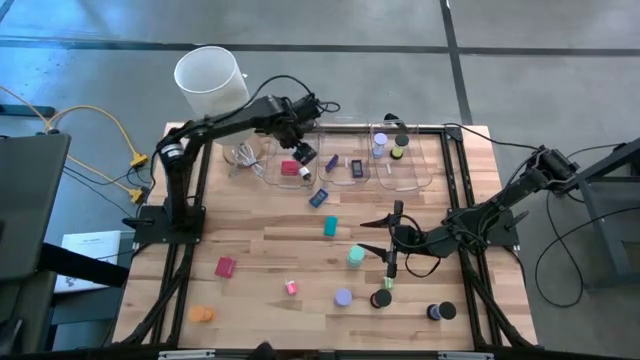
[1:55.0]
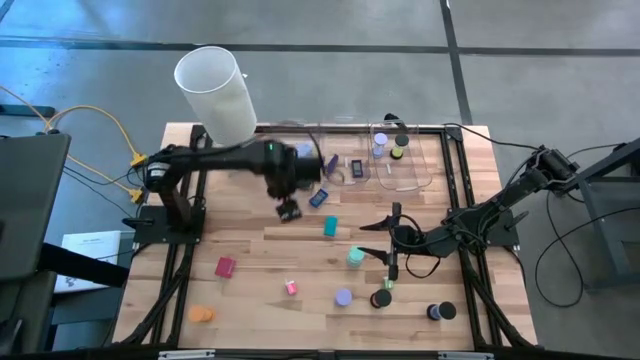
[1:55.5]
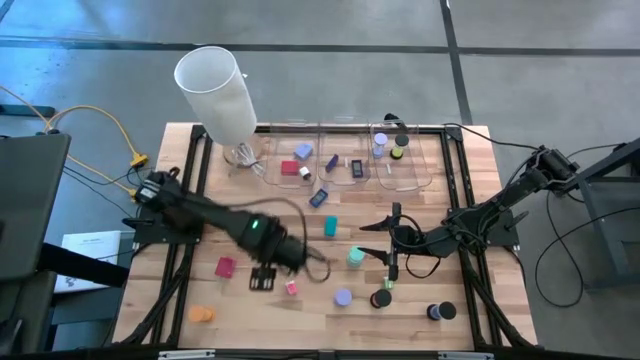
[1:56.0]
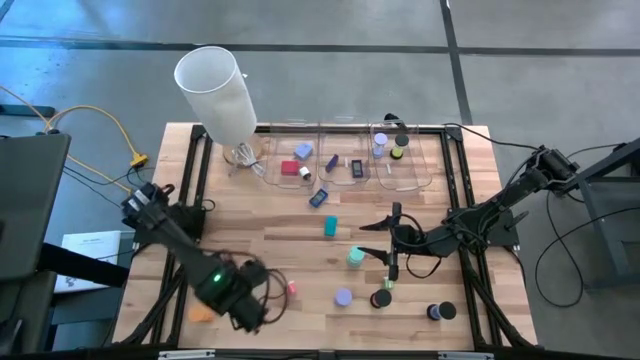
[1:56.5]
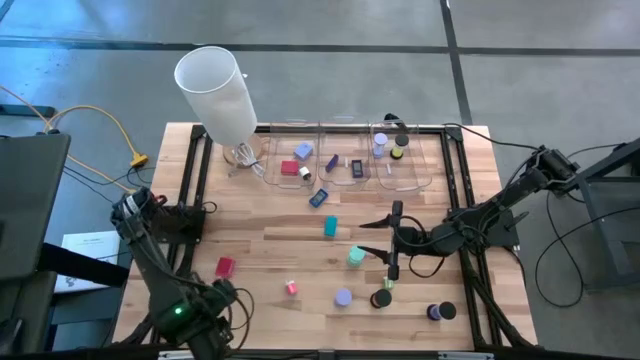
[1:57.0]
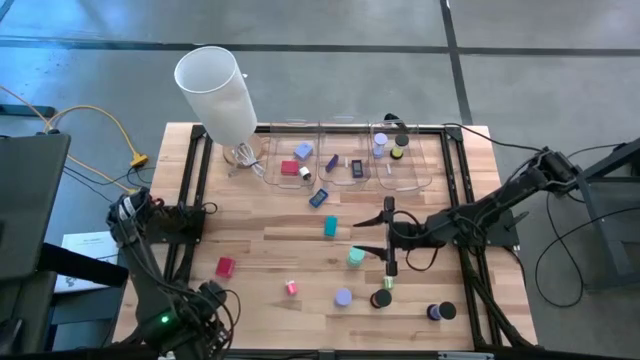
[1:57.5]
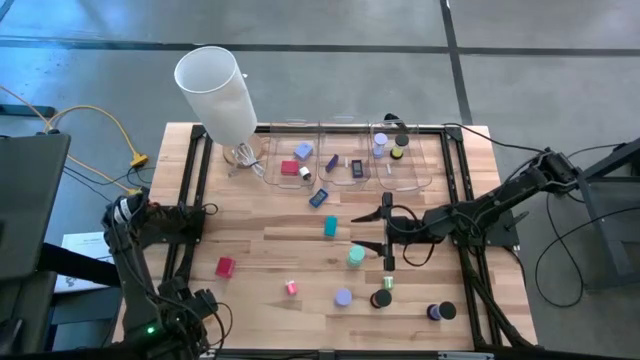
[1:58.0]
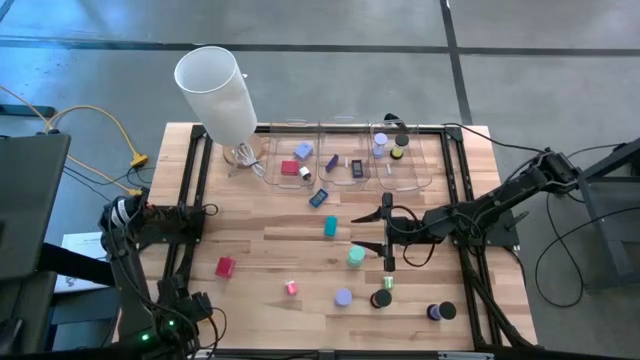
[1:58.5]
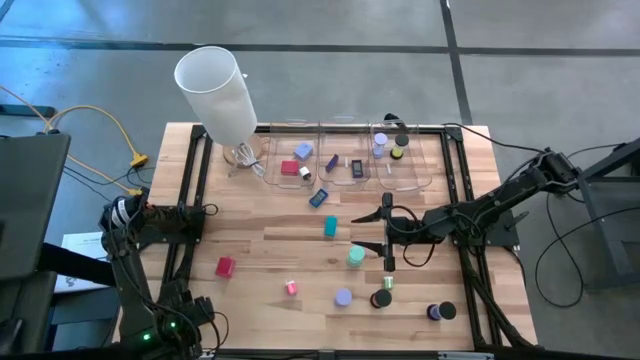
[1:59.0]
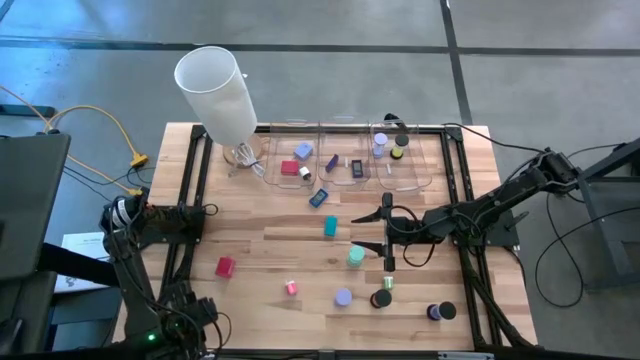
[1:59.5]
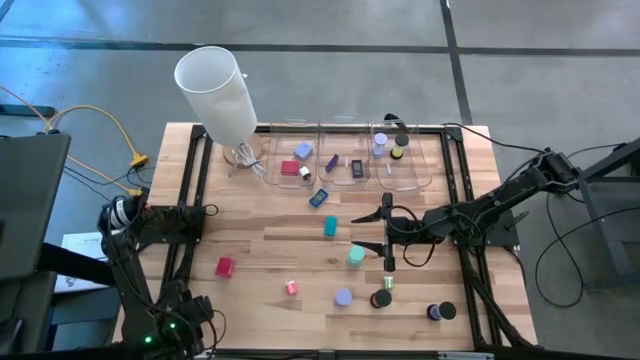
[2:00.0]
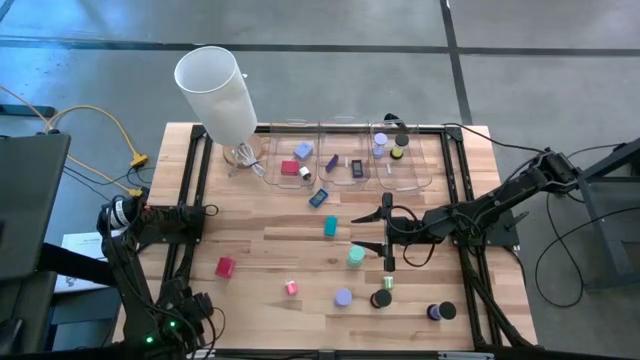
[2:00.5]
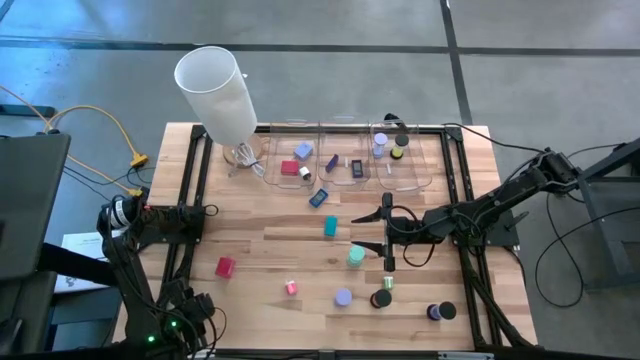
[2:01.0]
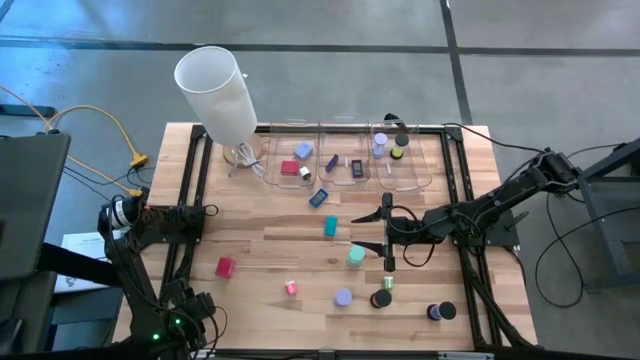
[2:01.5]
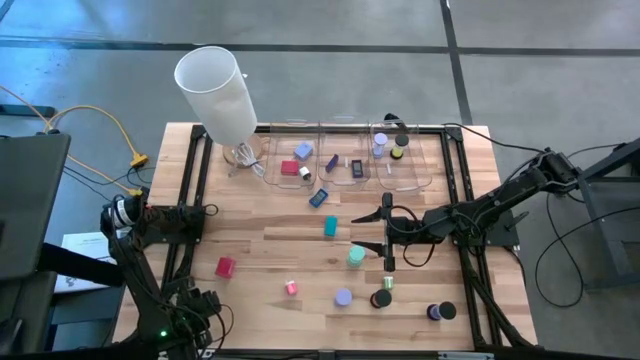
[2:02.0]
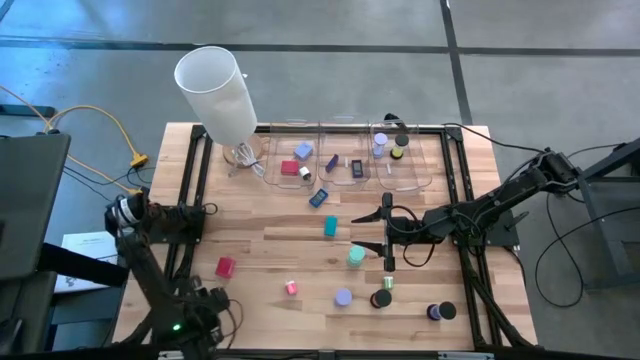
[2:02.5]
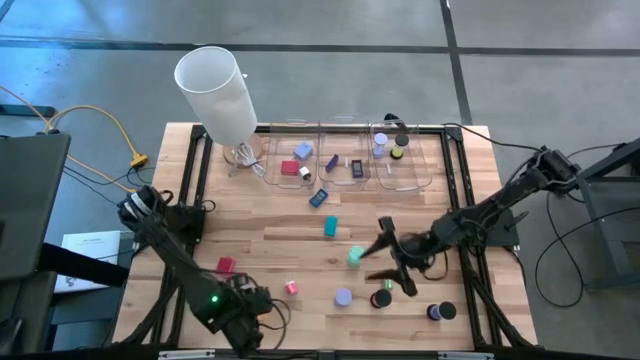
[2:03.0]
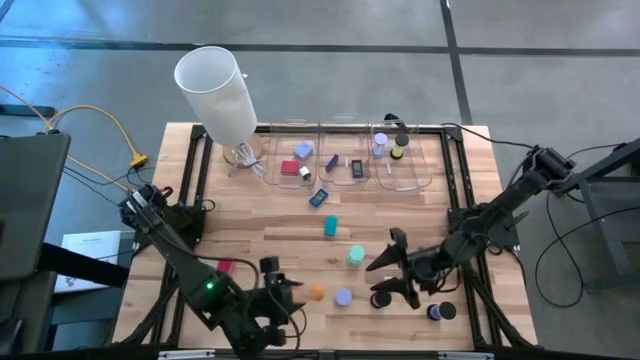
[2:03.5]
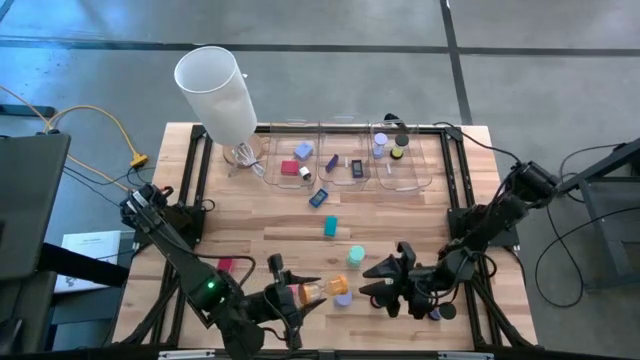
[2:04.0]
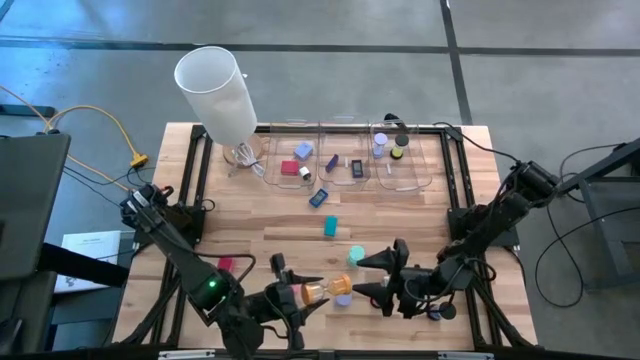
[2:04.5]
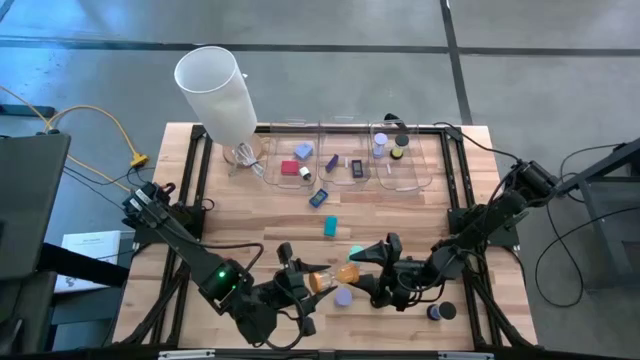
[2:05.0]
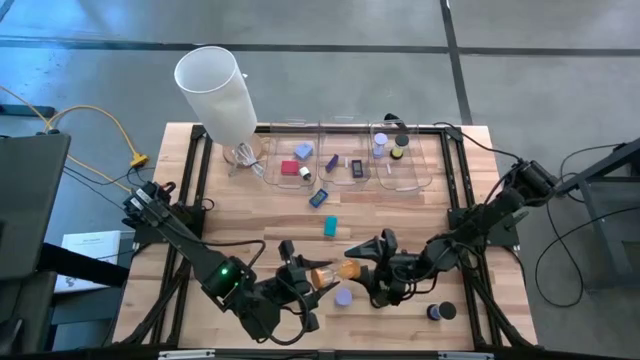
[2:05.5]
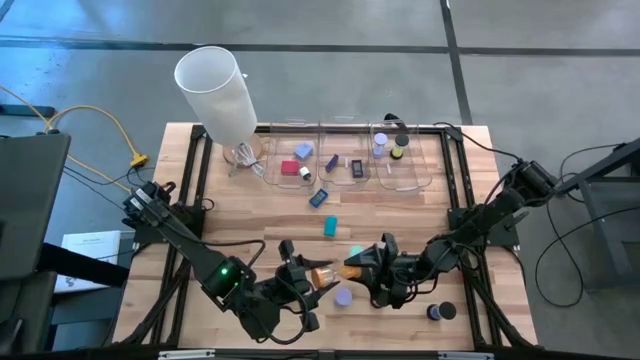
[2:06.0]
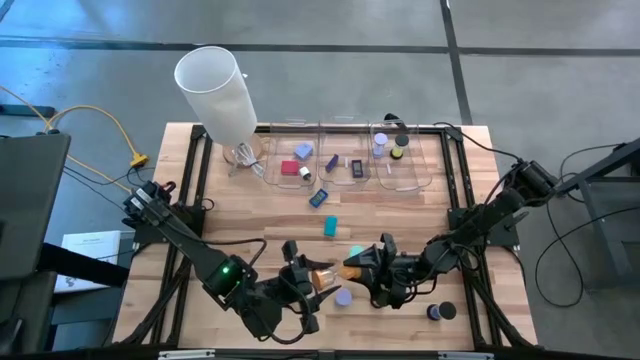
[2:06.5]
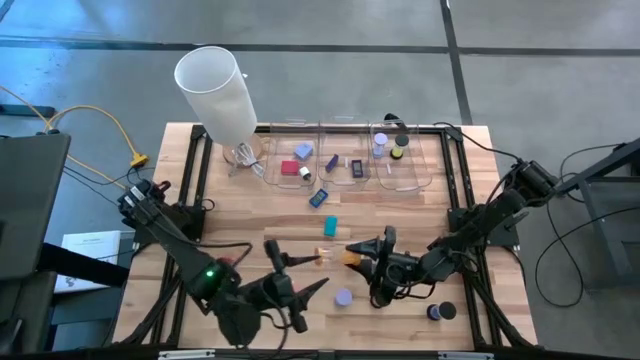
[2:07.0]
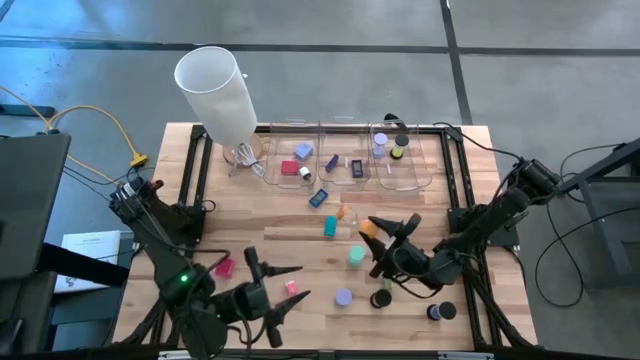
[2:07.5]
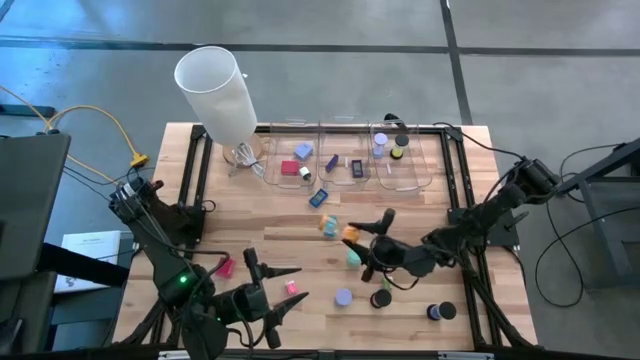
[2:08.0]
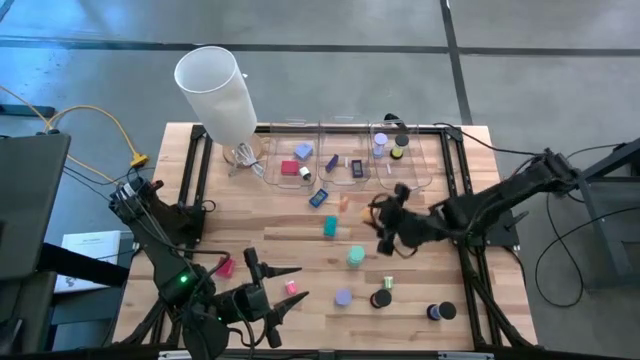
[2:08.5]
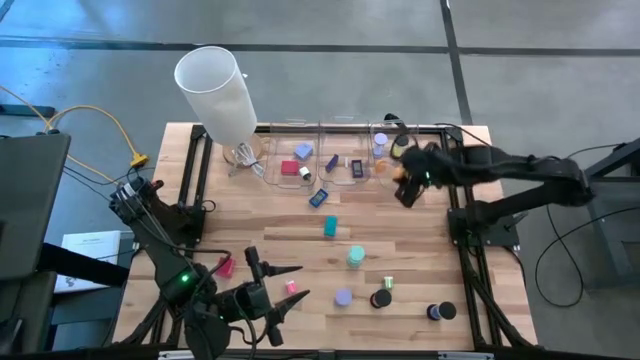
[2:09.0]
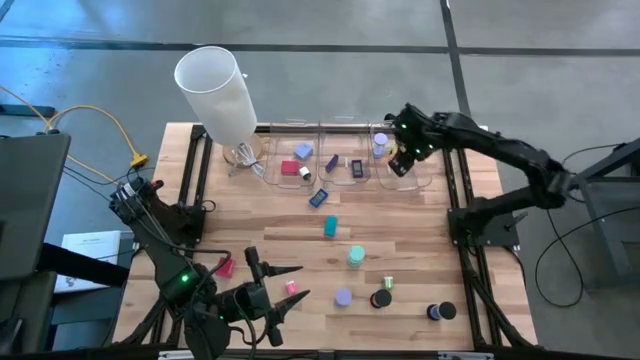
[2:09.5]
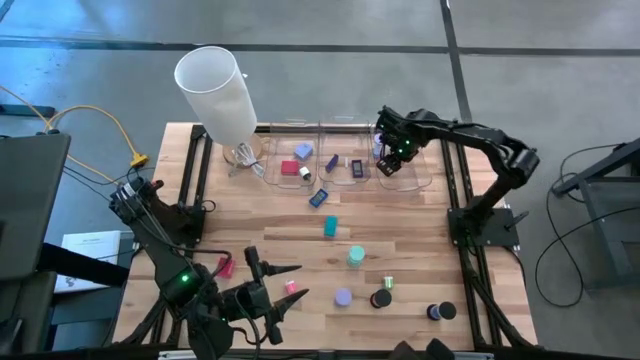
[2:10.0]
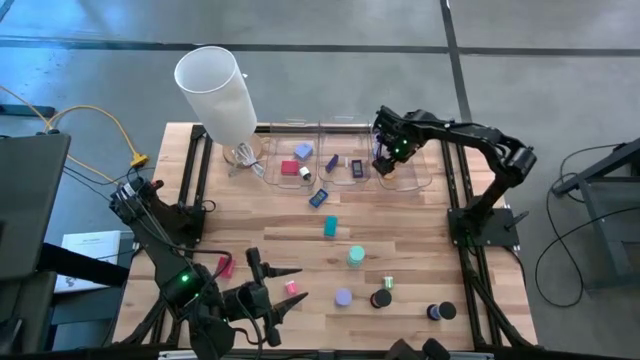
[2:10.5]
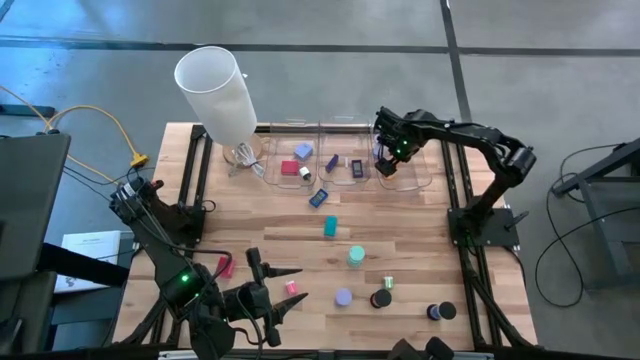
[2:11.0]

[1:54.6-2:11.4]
Task: Pick & Place Office items
Put the yellow hourglass into the right transparent bin

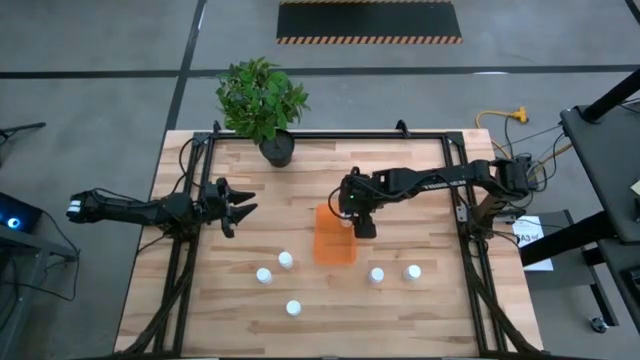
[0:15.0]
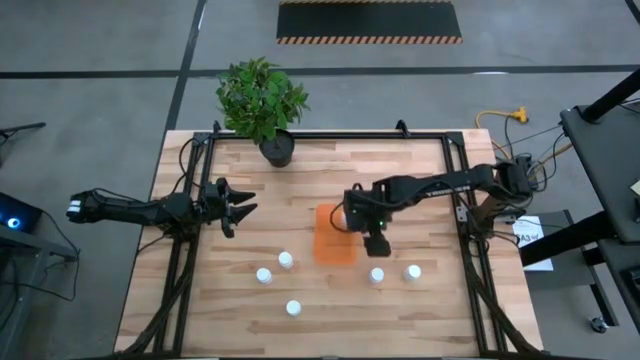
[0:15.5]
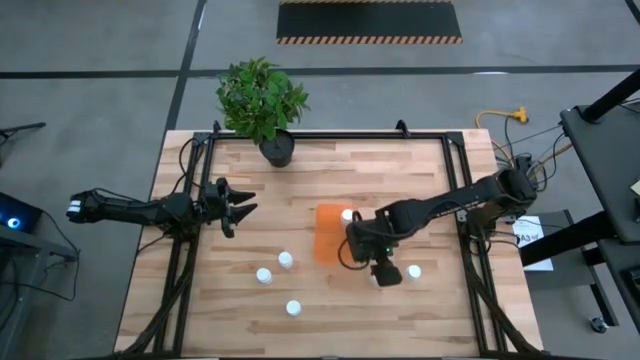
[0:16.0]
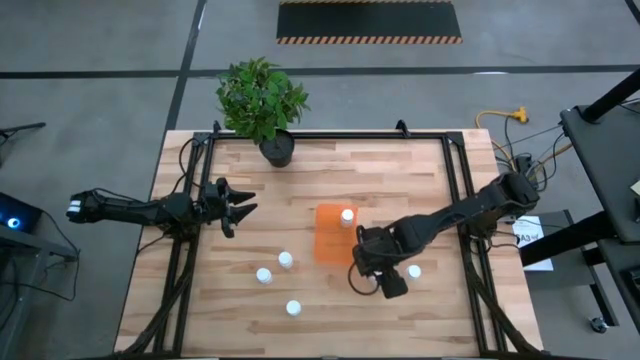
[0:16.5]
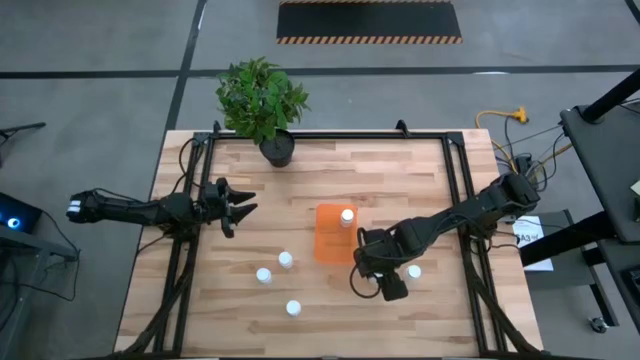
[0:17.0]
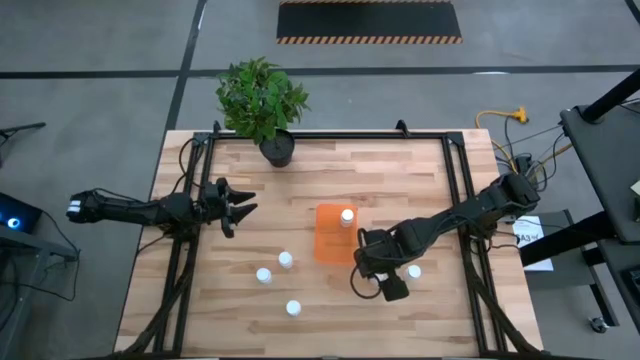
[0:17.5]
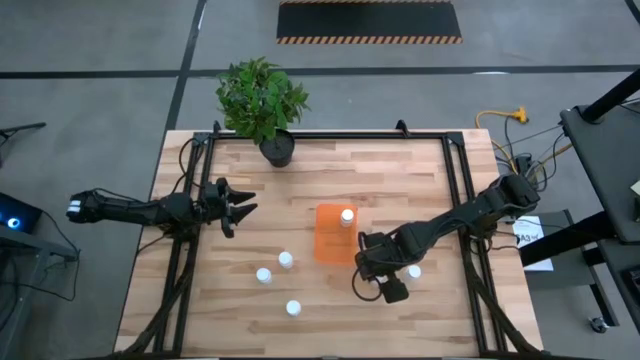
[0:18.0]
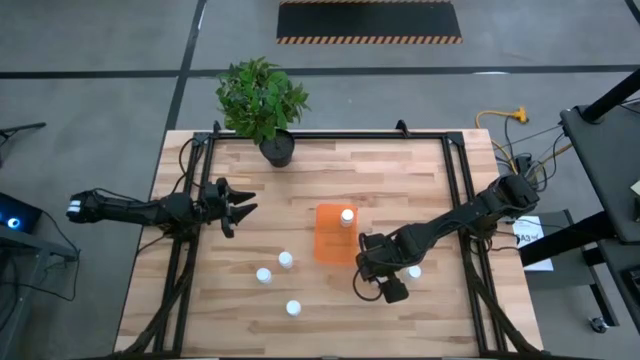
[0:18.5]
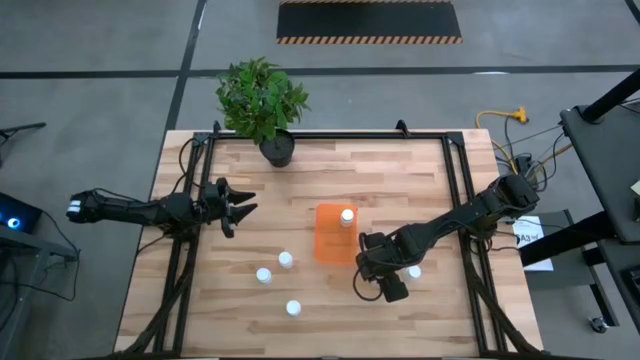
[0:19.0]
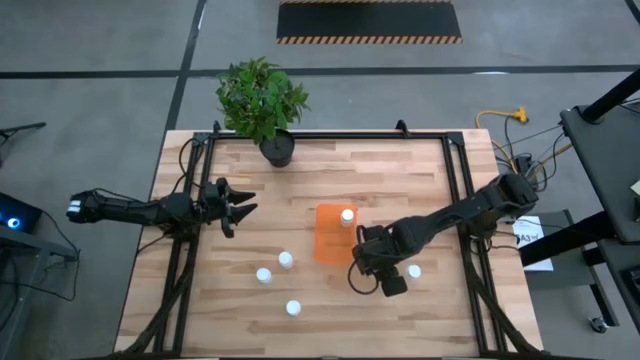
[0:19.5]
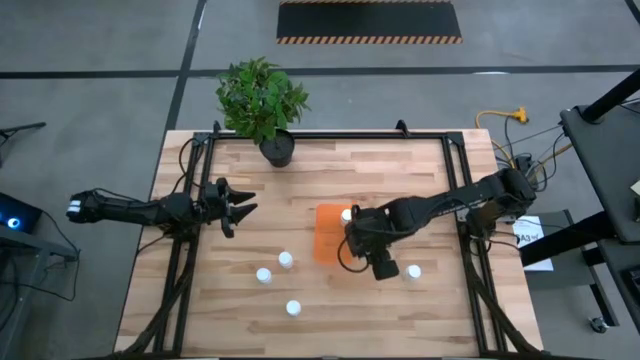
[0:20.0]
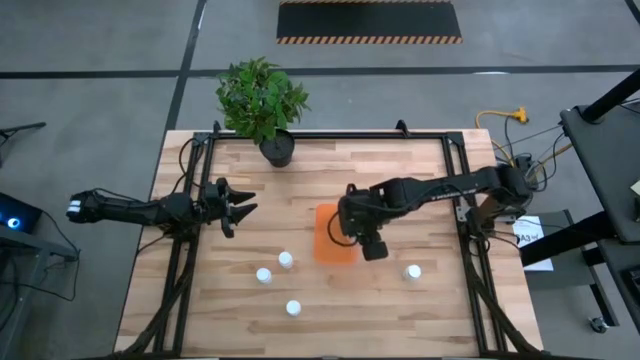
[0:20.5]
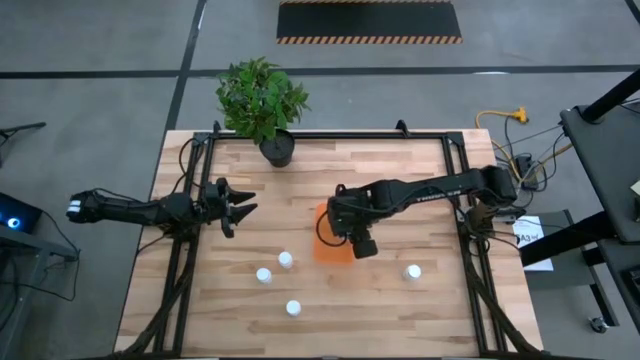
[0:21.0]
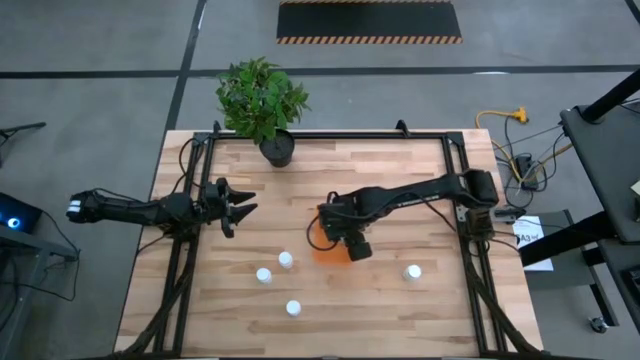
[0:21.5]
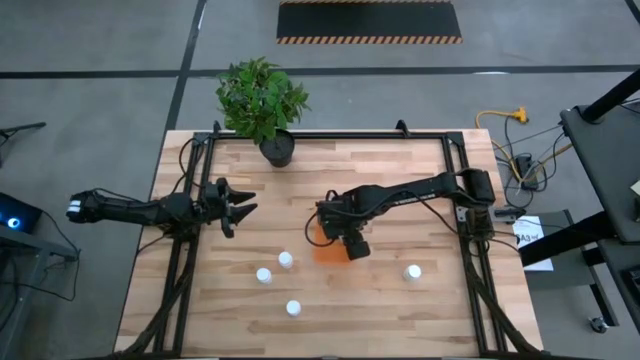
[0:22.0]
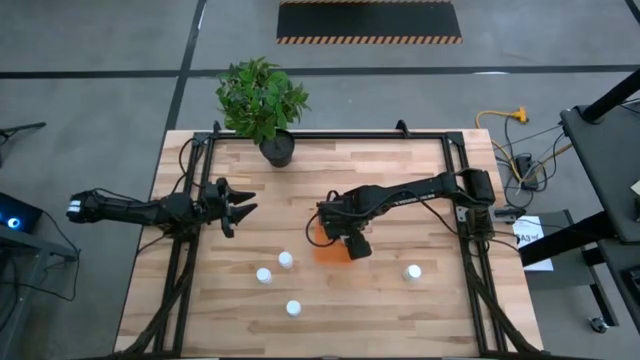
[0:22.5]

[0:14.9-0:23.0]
Task: Pick and place pill bottles into a basket
Put the white pill bottle into the orange bin
